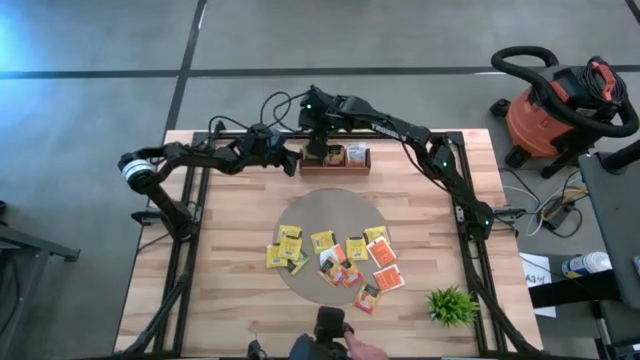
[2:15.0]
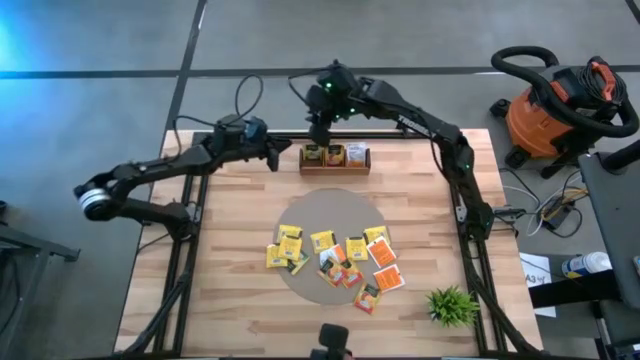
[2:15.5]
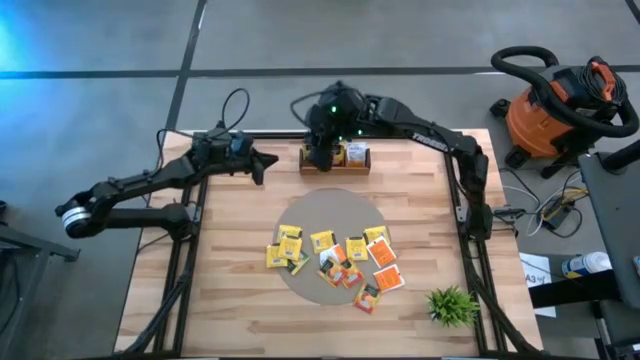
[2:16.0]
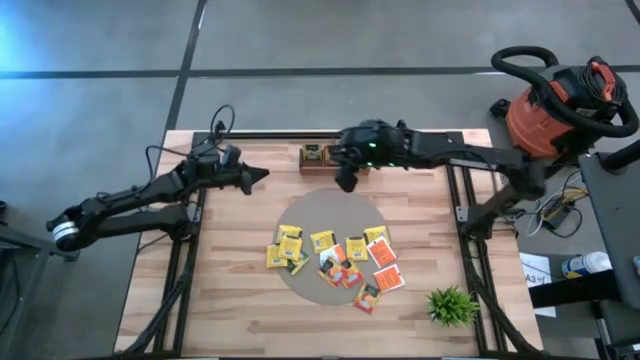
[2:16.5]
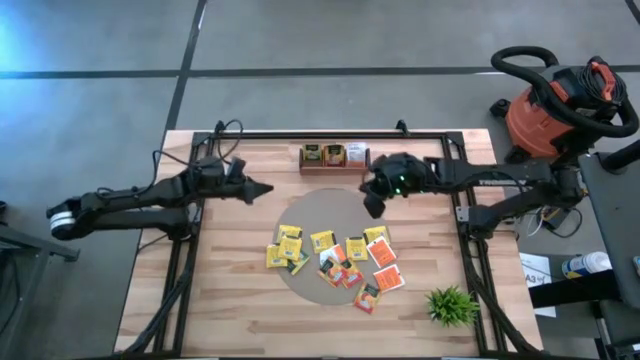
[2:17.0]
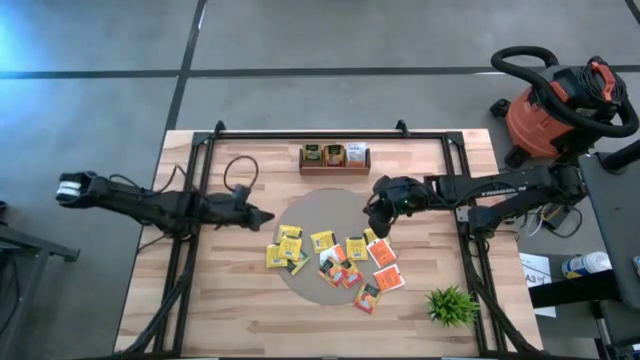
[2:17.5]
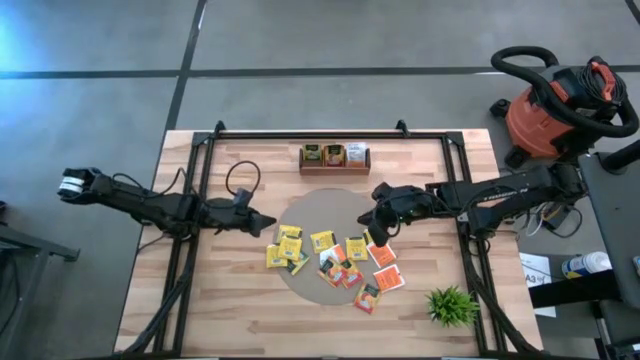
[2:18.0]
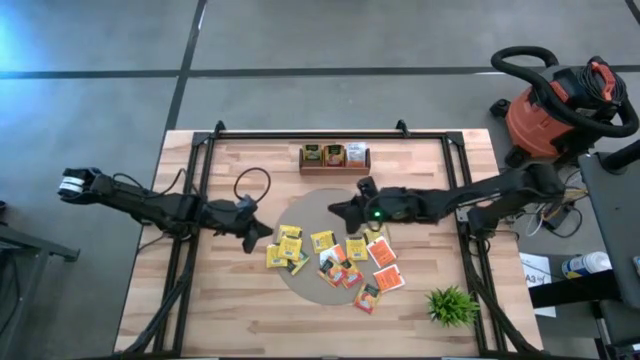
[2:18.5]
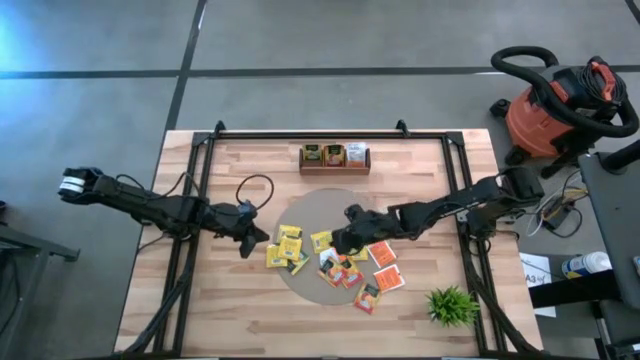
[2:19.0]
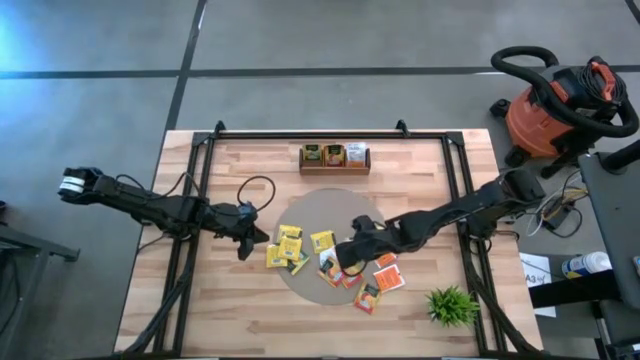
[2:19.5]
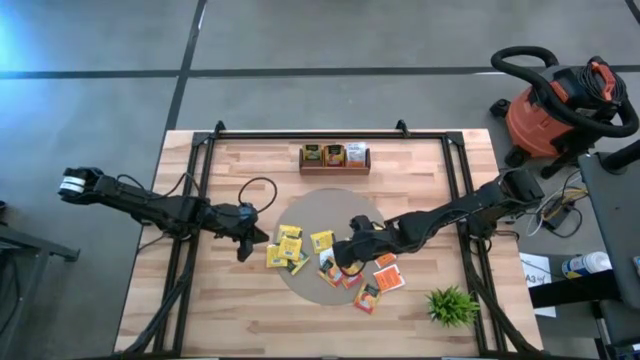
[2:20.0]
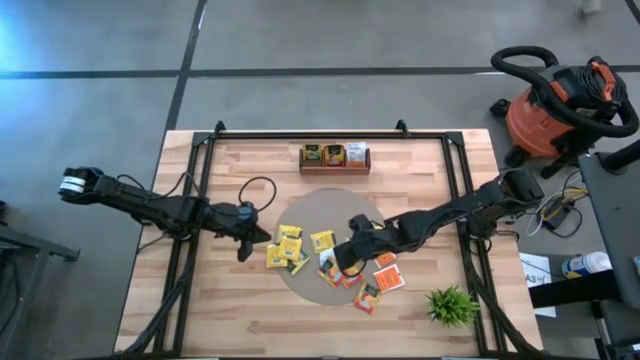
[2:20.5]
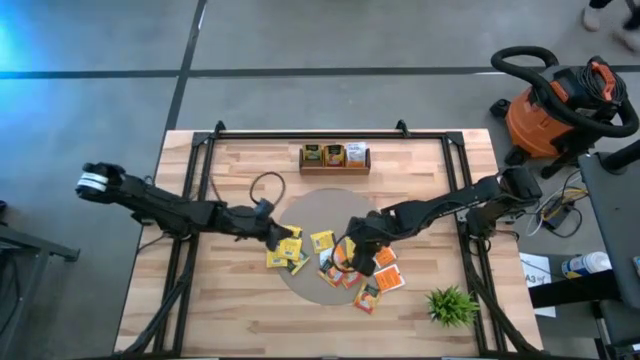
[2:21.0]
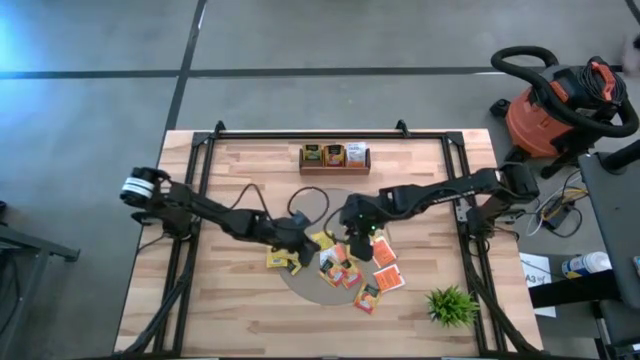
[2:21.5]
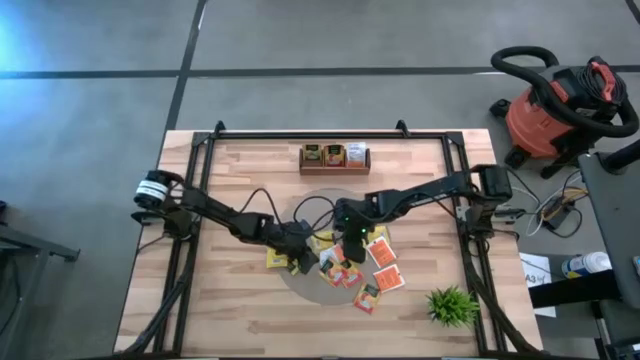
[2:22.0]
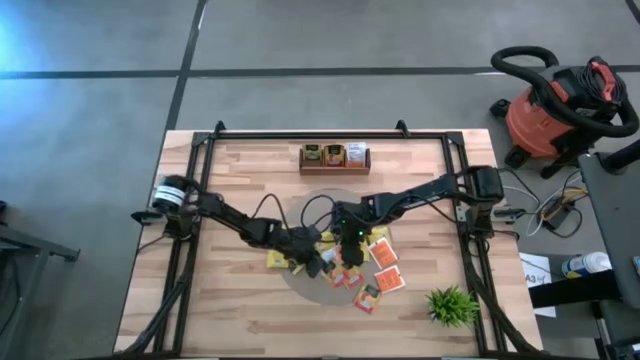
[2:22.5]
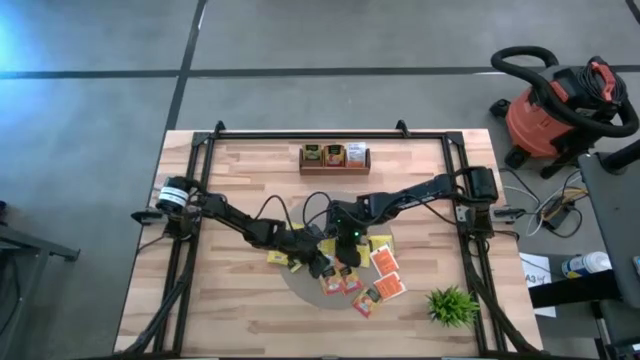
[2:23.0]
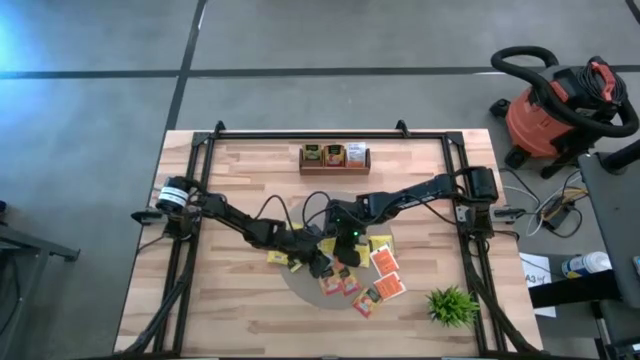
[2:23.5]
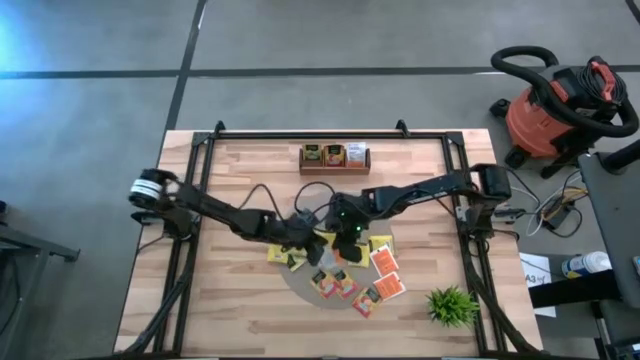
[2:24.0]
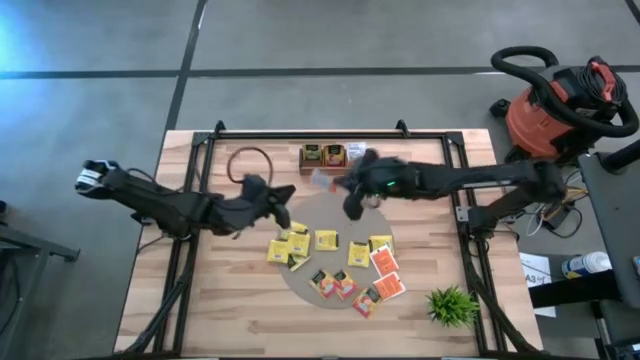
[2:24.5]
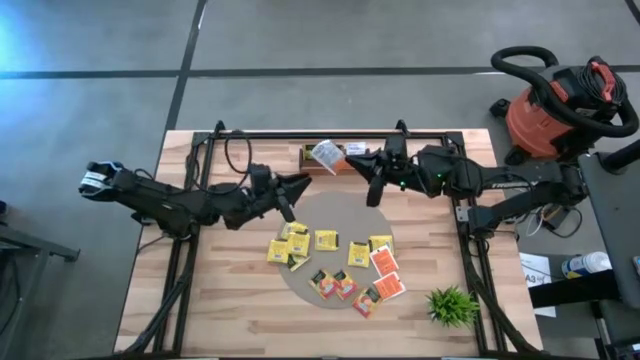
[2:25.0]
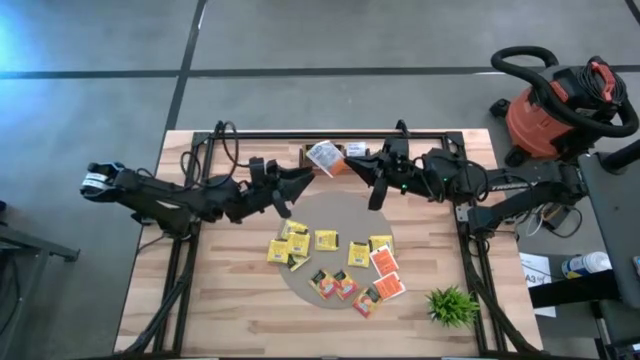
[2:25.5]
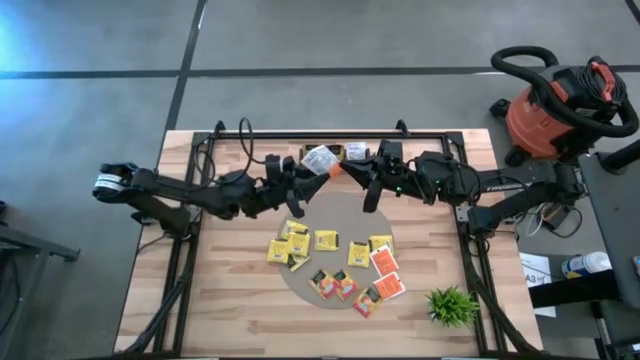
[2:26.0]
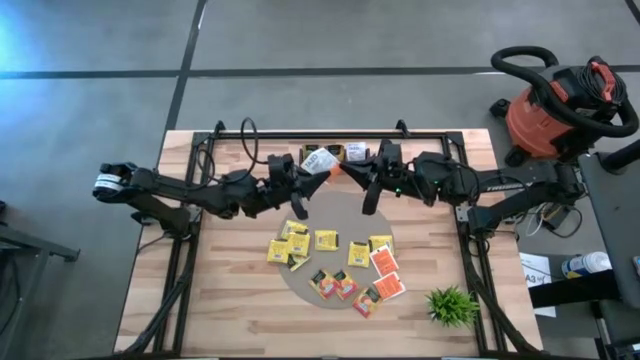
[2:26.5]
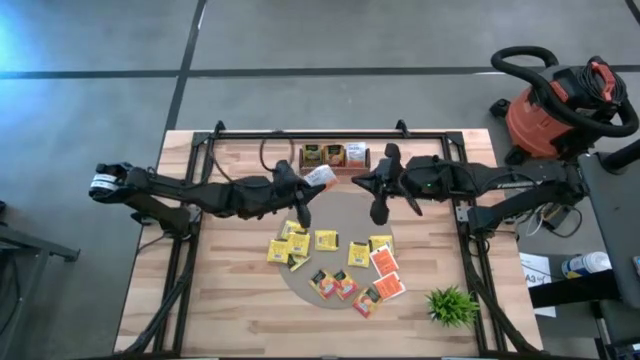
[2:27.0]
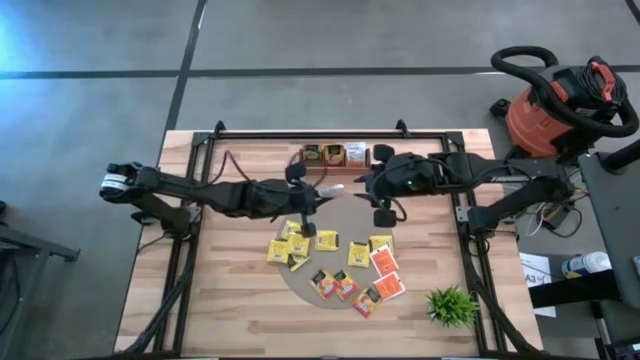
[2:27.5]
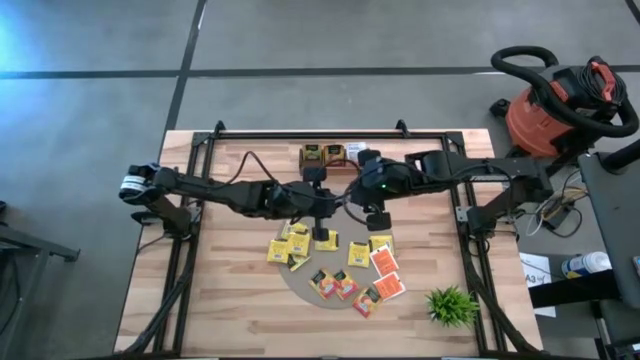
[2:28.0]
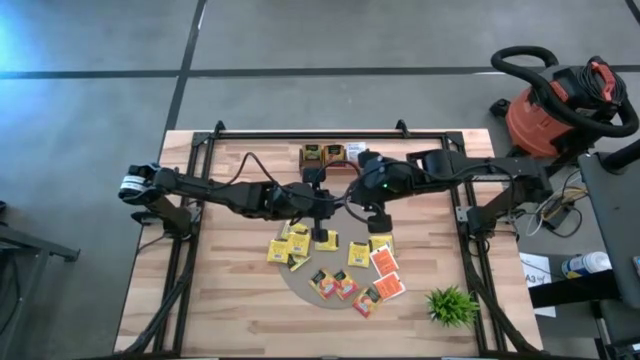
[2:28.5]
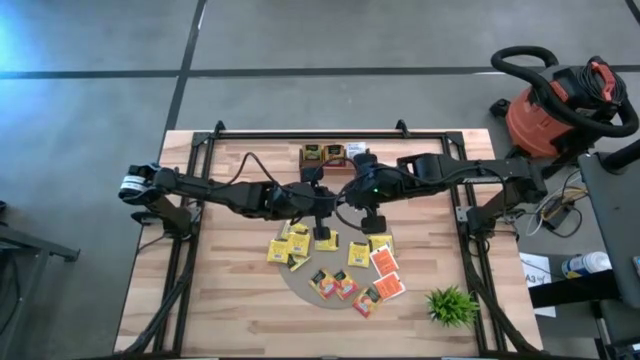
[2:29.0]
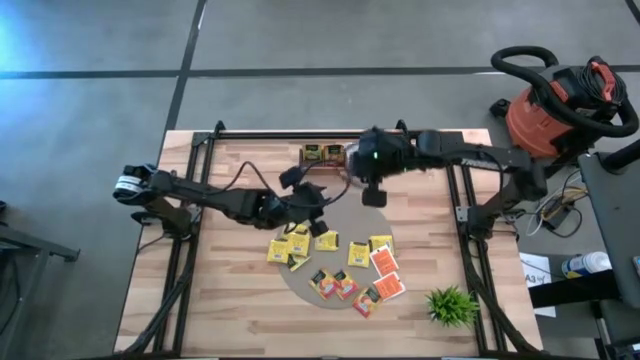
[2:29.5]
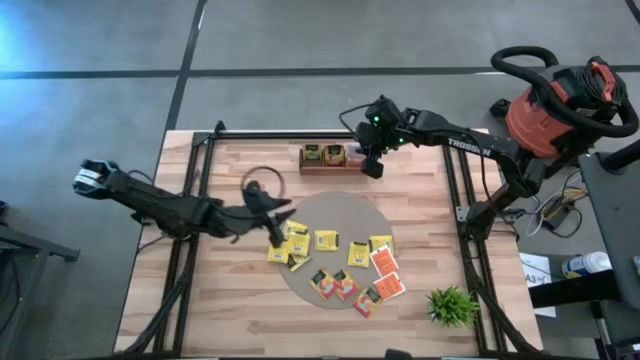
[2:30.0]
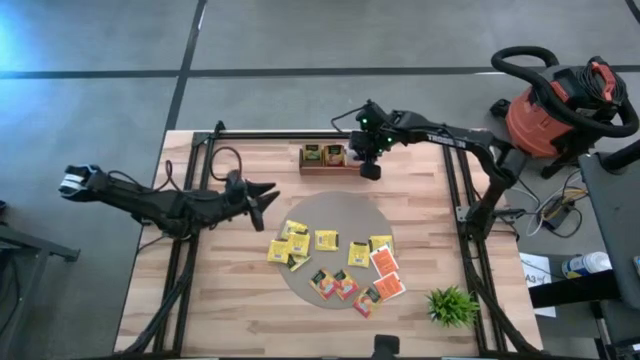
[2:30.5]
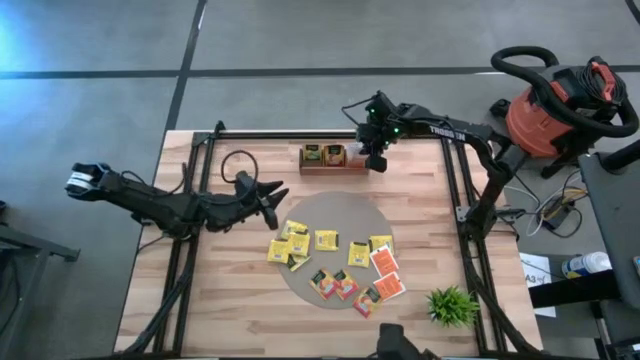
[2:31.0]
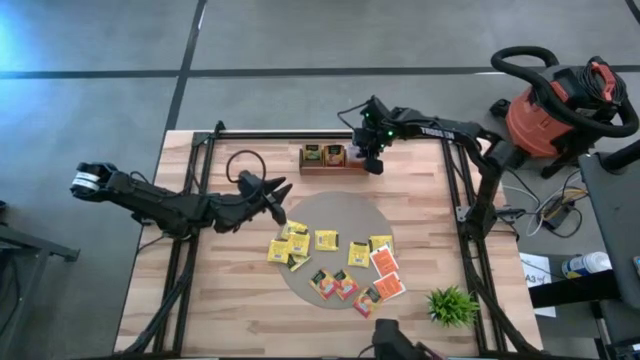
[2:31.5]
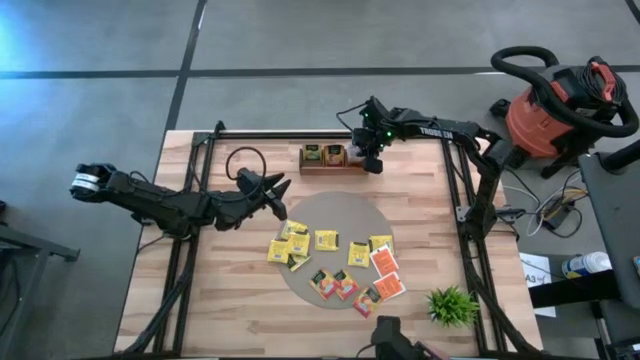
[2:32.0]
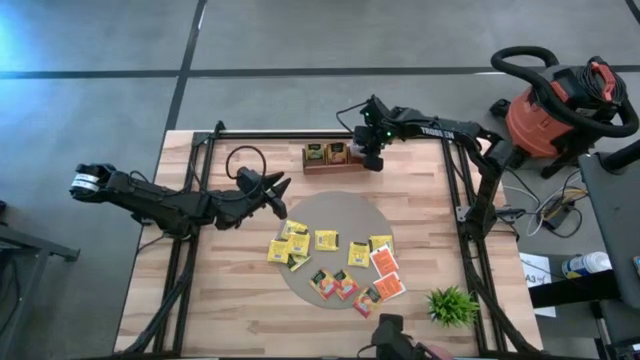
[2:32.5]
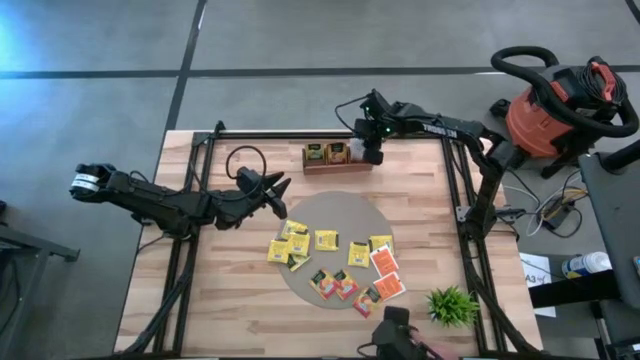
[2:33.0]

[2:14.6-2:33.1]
Task: Pick & Place Tea
Put the top left white tea bag into the right compartment of the wooden organizer

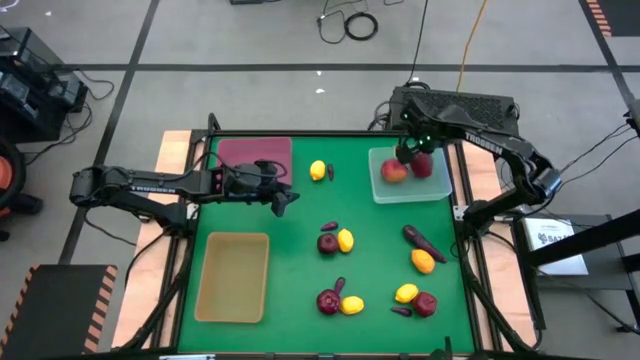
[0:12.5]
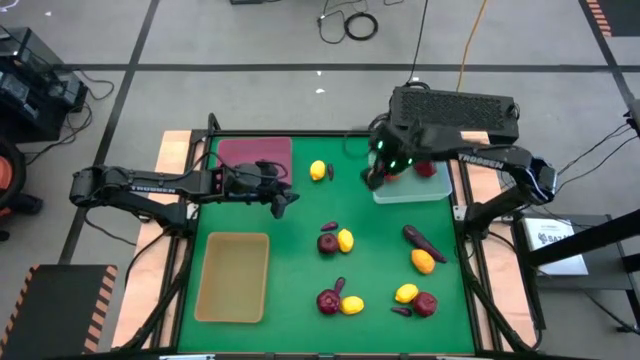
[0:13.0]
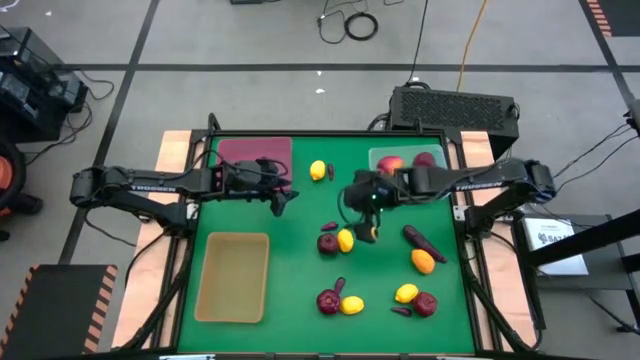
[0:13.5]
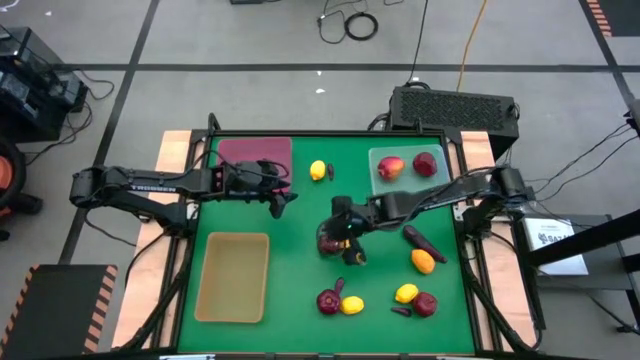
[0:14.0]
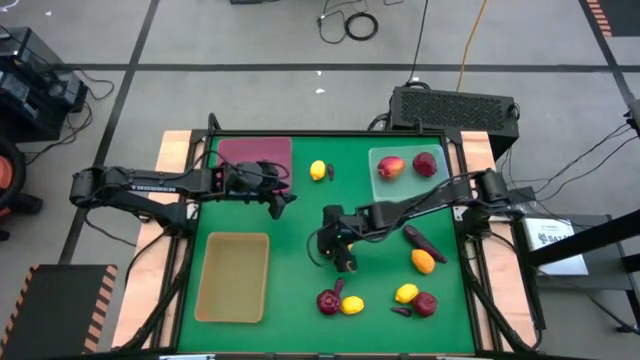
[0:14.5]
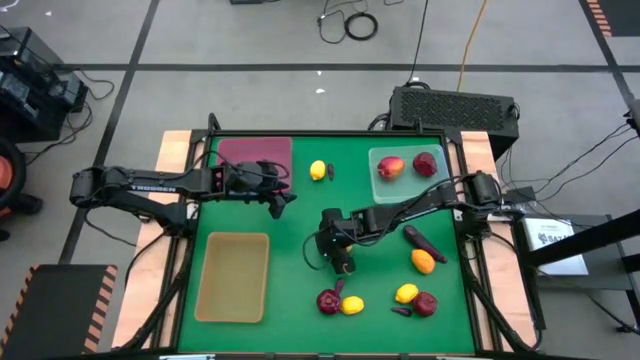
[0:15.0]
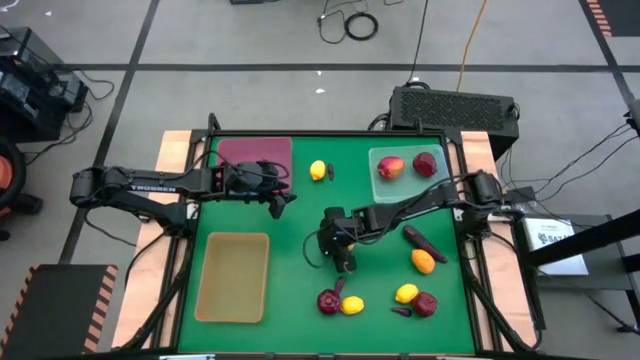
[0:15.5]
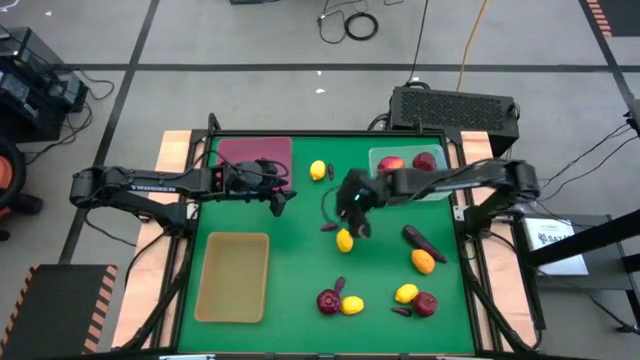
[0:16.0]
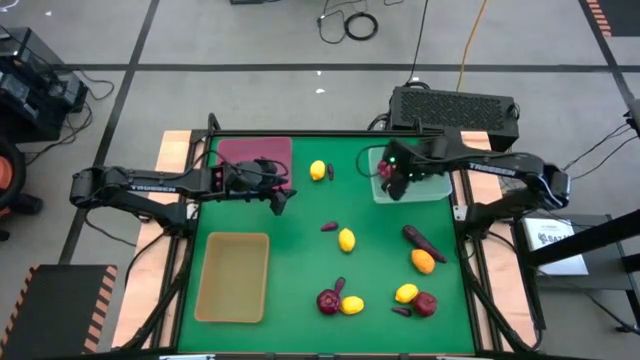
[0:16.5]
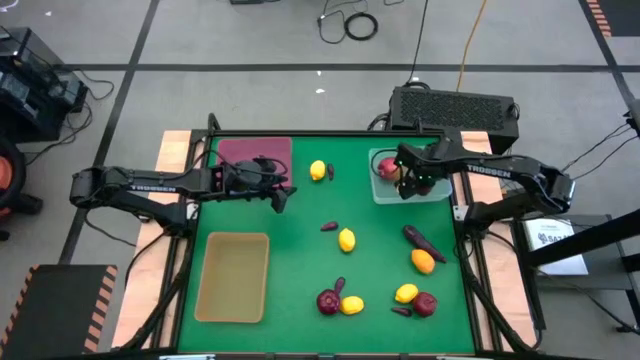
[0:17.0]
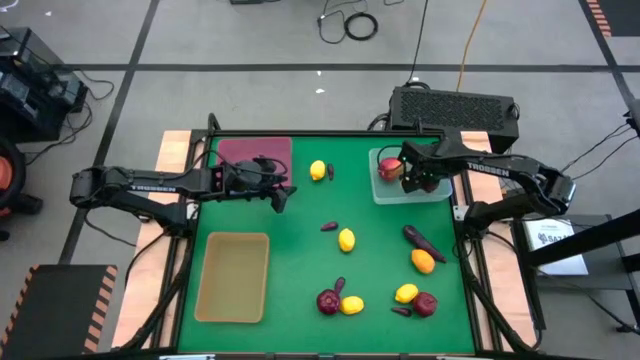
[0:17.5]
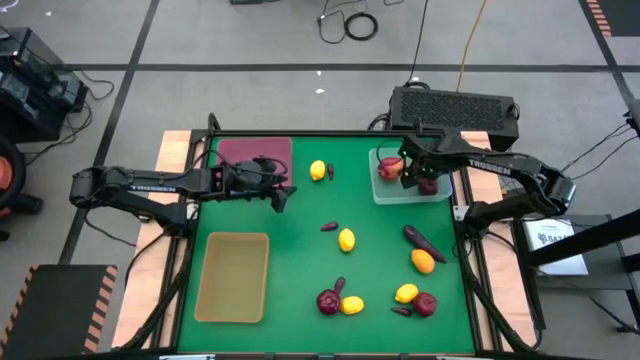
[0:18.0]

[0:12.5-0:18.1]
Task: Sort produce into baskets
Put the apple into the transparent bin
